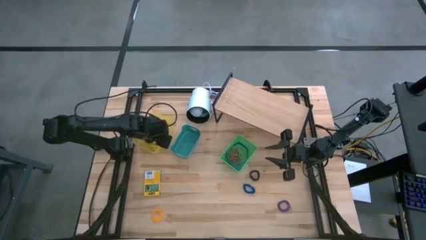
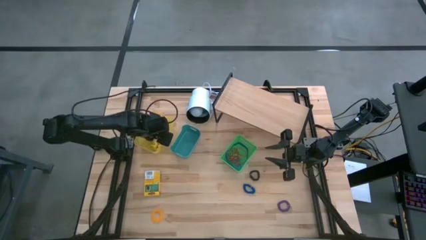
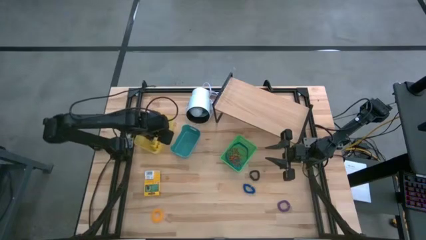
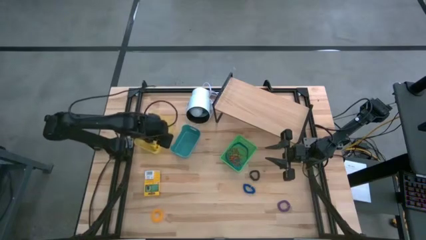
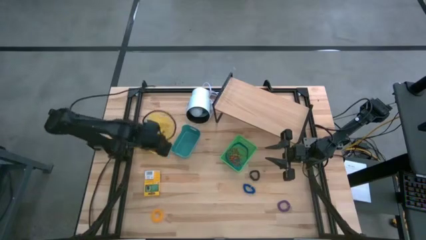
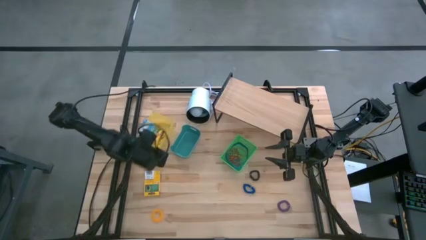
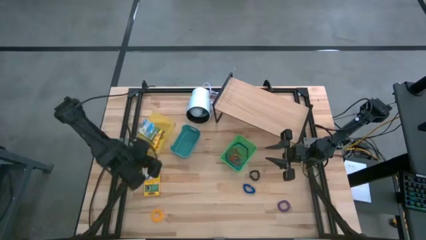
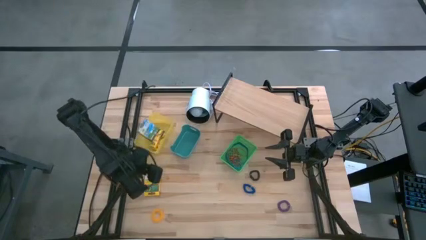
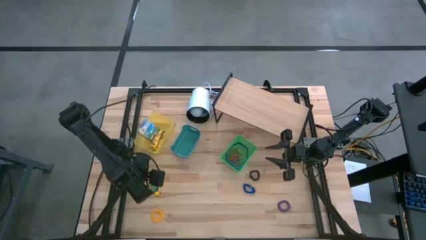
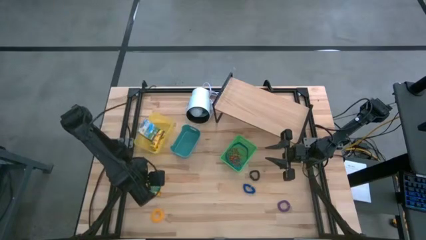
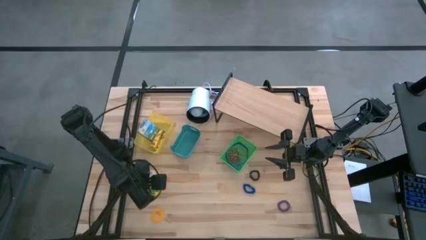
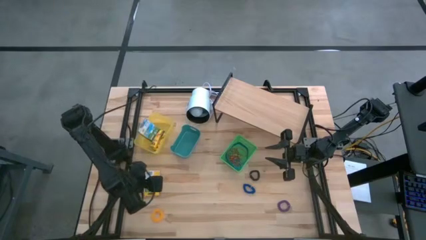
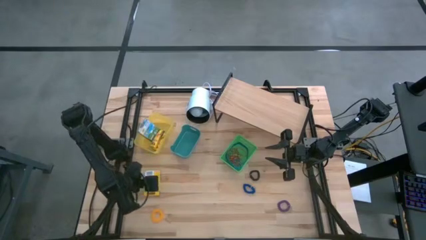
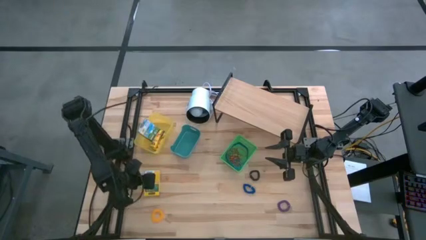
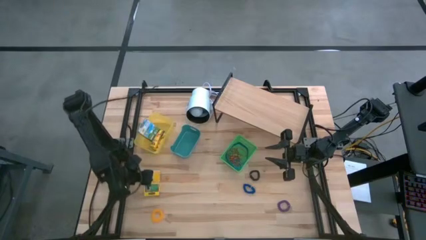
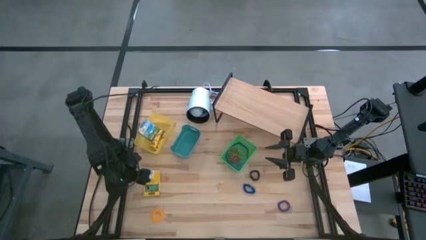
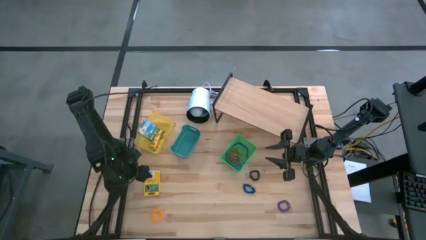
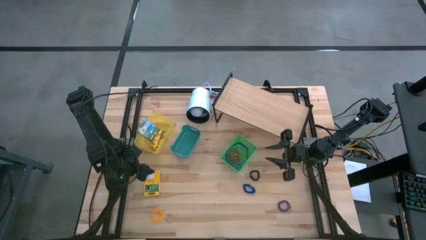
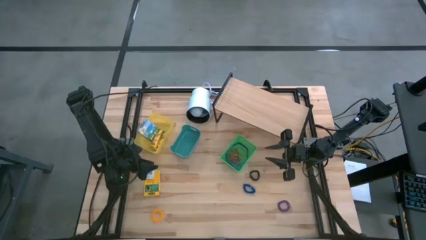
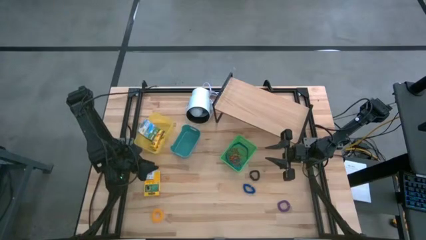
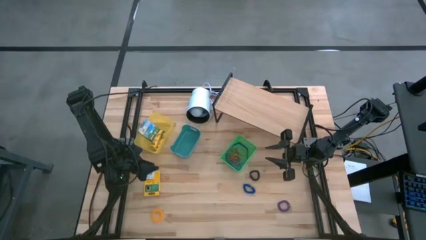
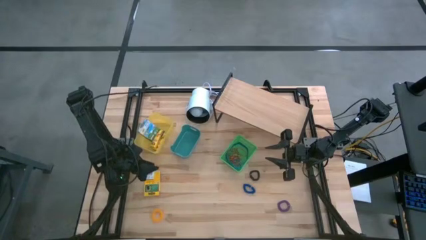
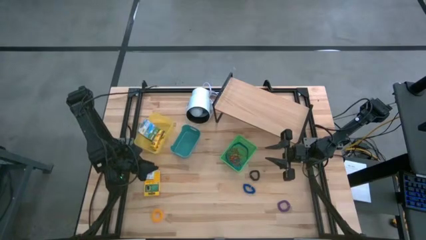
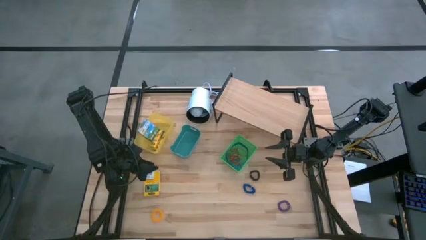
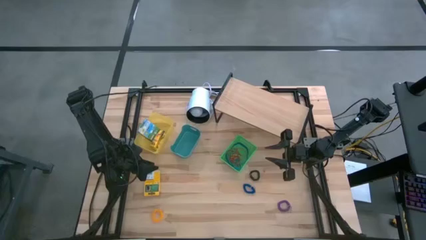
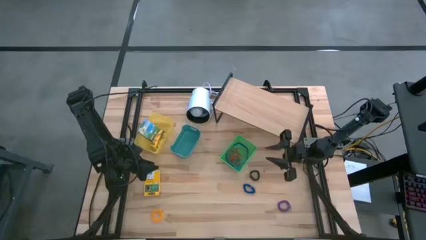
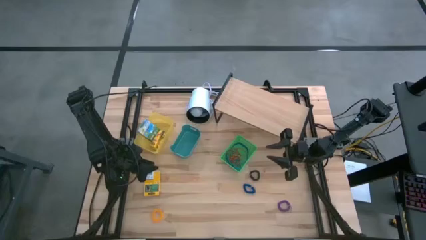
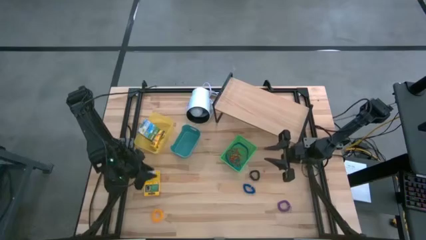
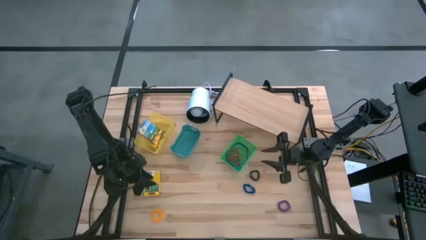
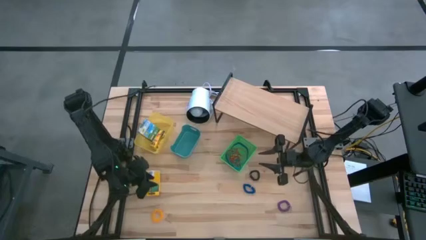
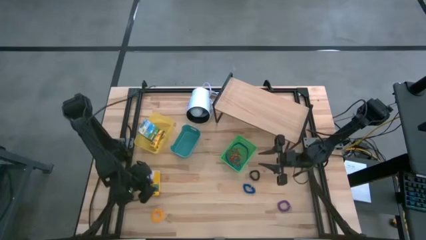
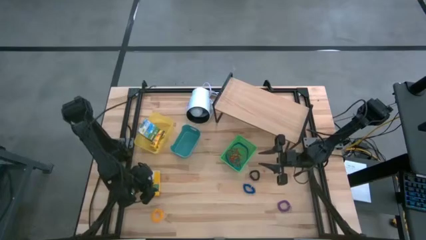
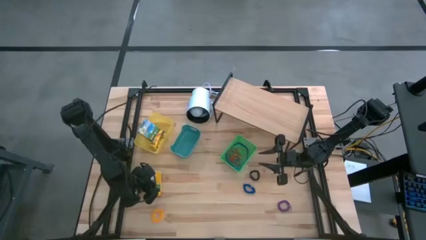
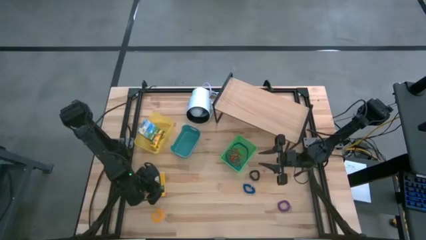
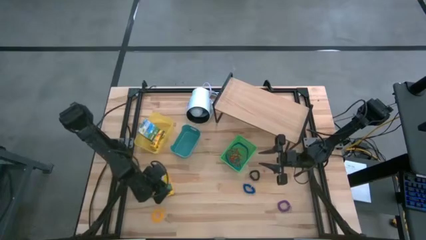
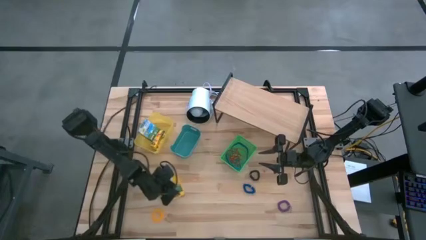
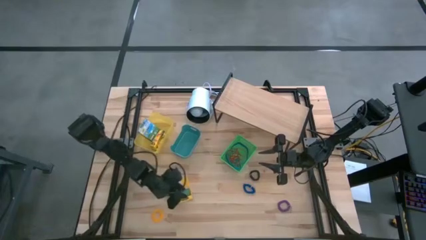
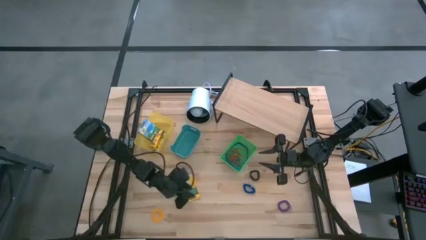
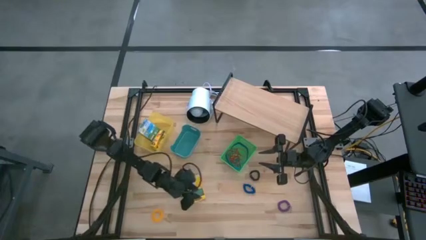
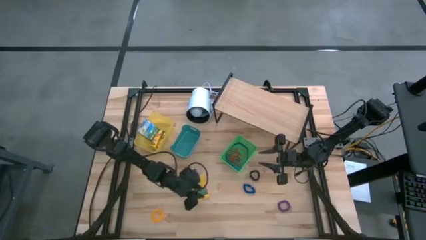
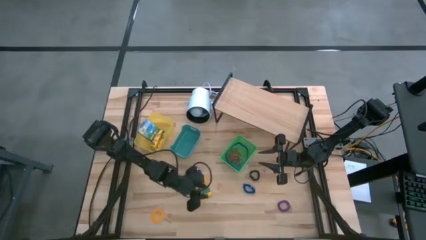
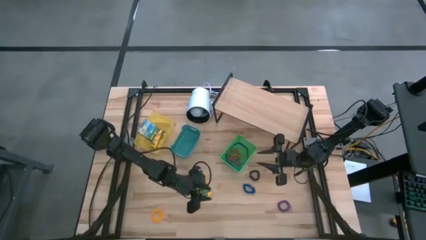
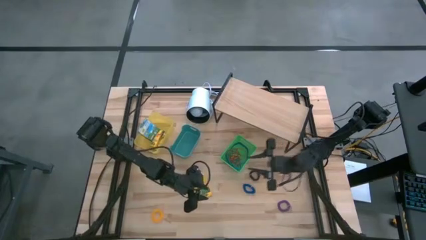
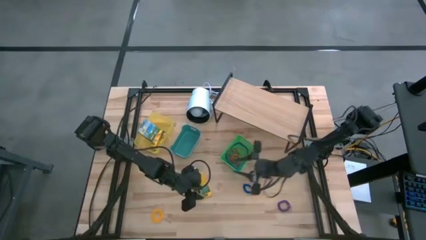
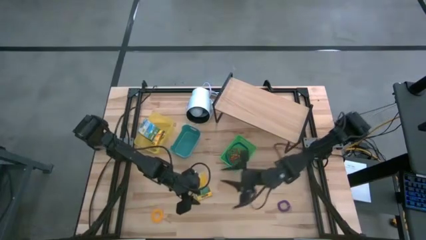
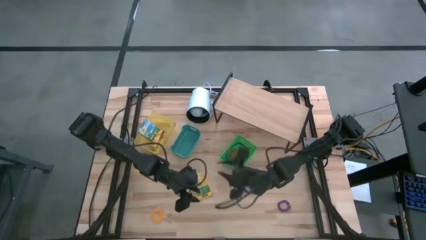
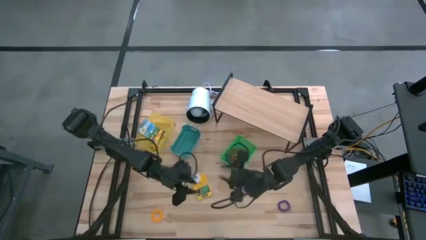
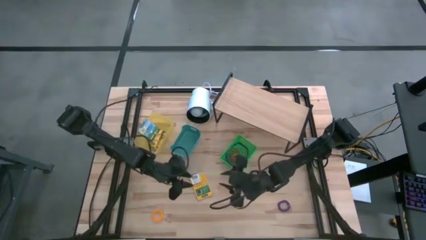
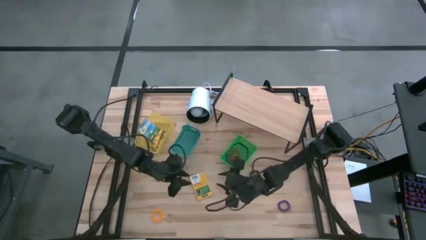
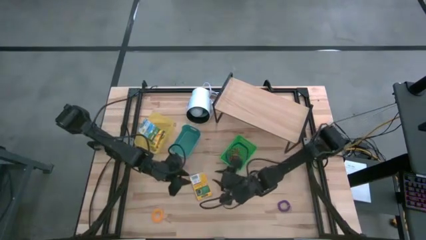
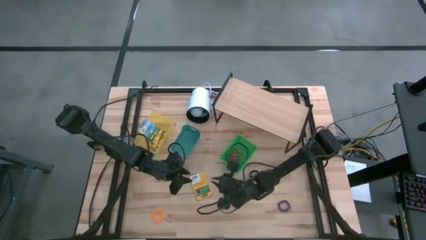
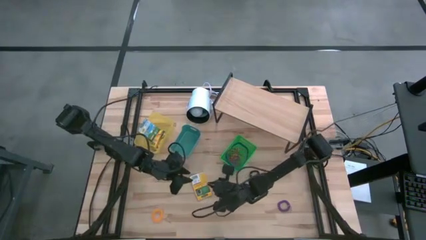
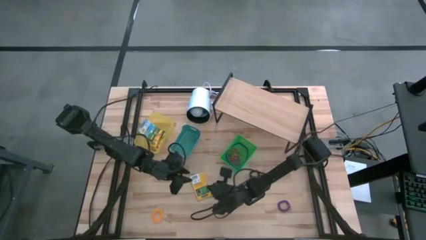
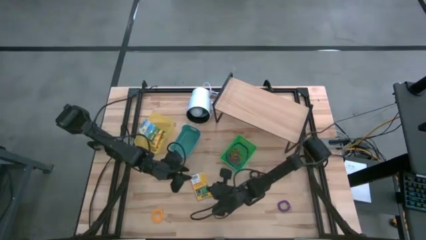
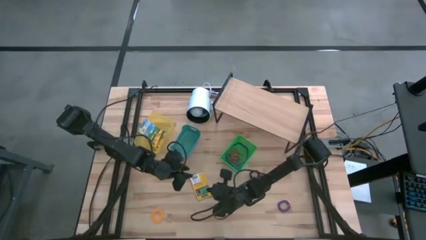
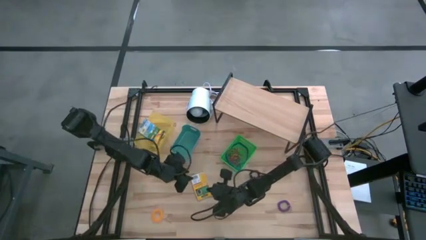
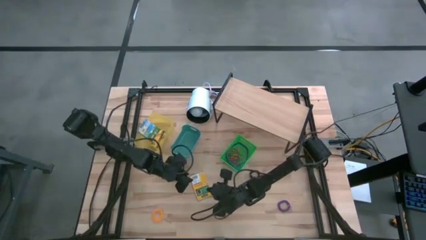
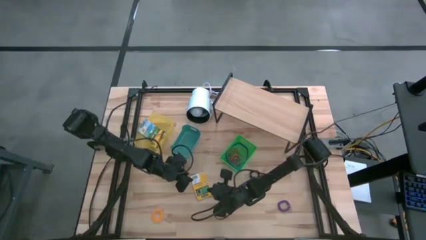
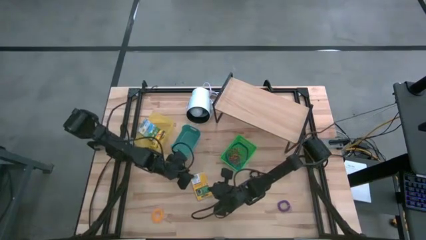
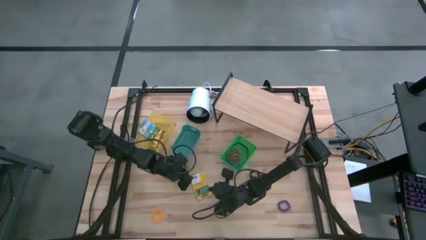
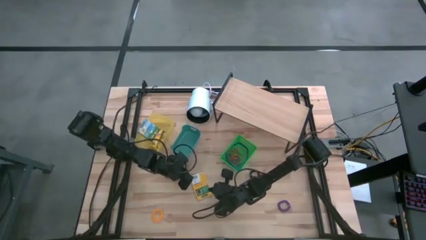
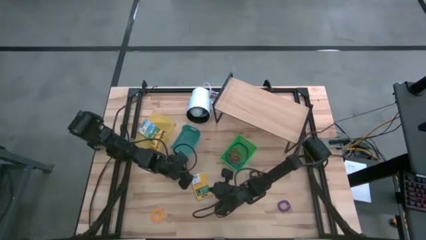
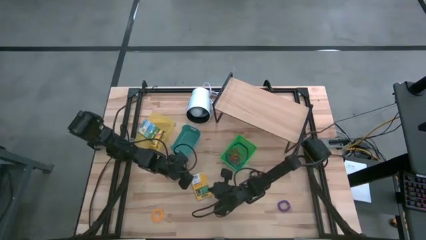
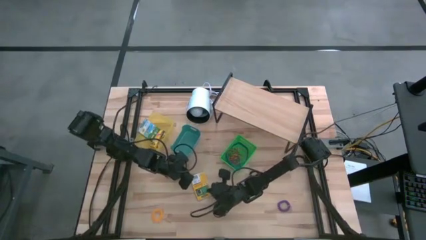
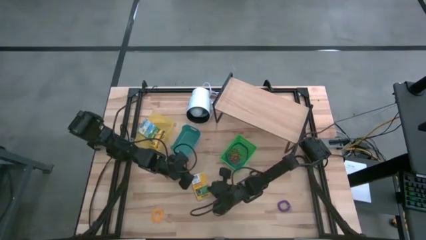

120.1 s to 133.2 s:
Task: Pick & Place Office Desk Supplies
Put the big yellow crayon box into the yellow bin
